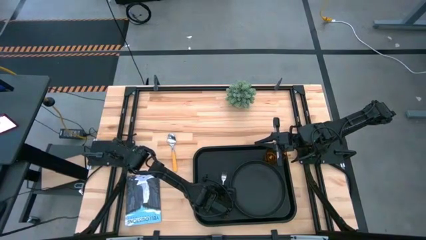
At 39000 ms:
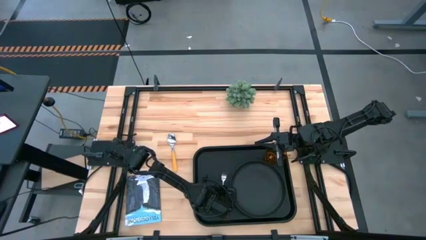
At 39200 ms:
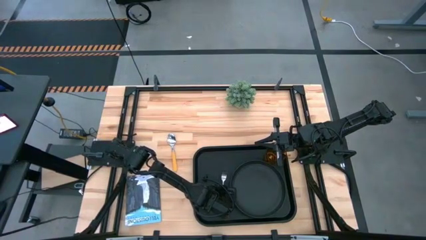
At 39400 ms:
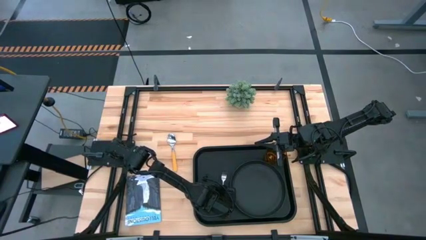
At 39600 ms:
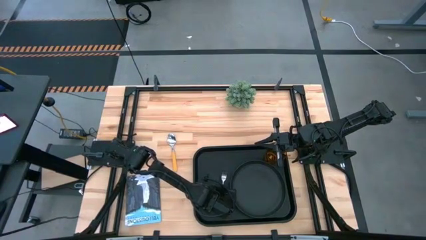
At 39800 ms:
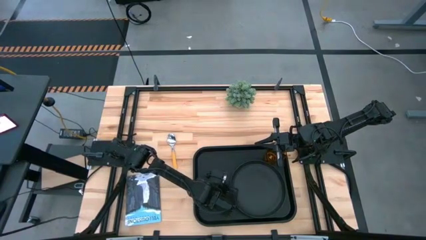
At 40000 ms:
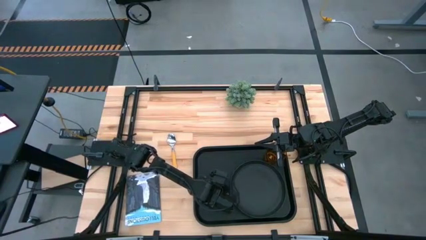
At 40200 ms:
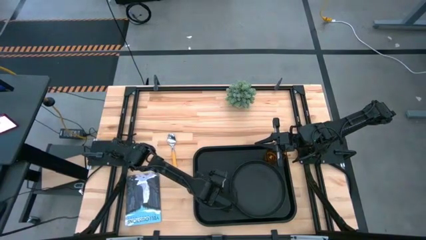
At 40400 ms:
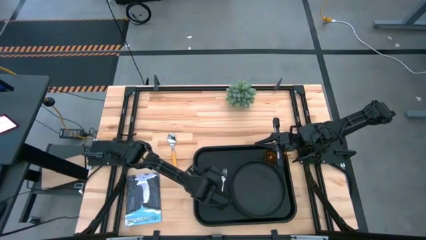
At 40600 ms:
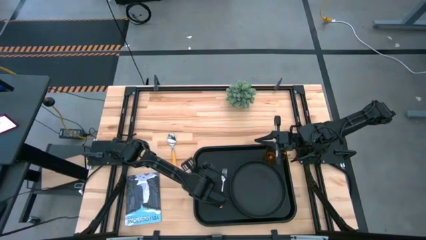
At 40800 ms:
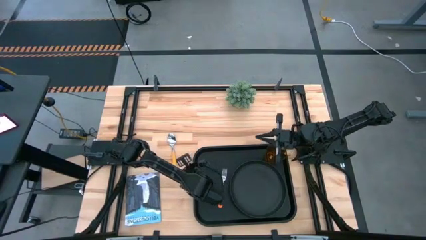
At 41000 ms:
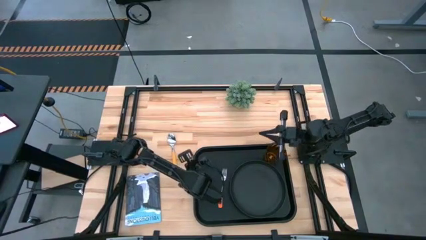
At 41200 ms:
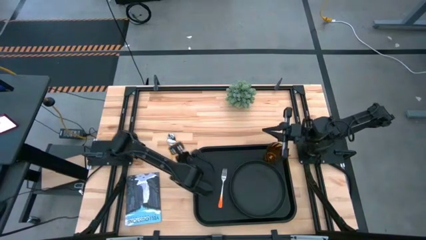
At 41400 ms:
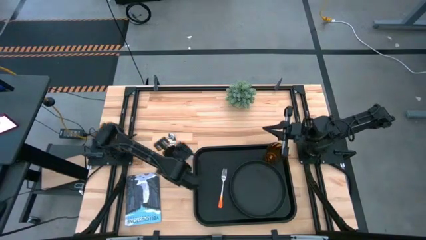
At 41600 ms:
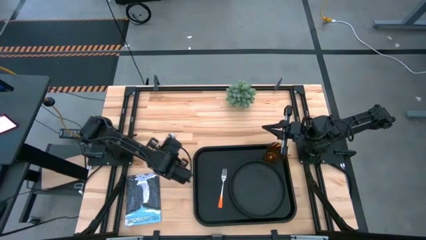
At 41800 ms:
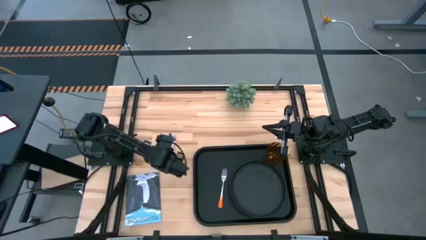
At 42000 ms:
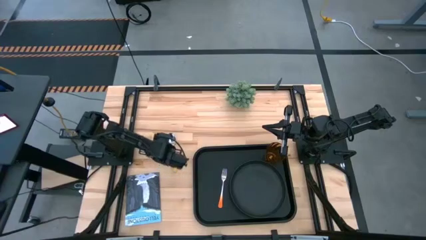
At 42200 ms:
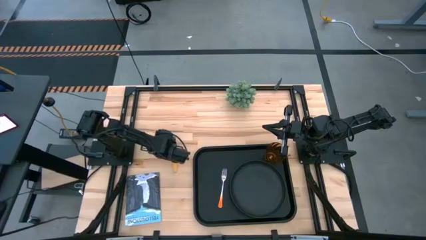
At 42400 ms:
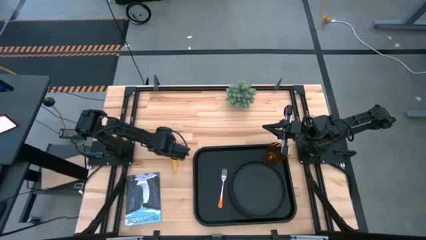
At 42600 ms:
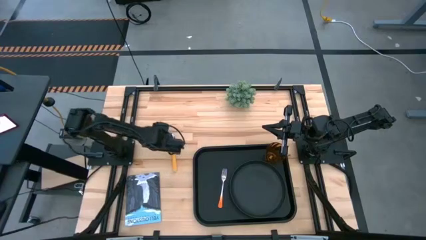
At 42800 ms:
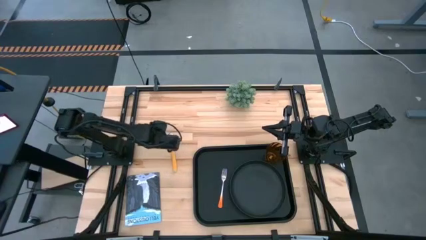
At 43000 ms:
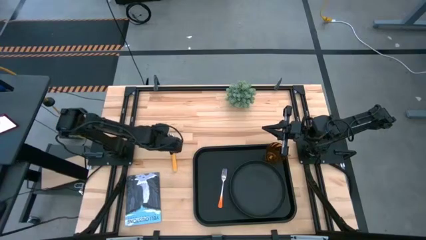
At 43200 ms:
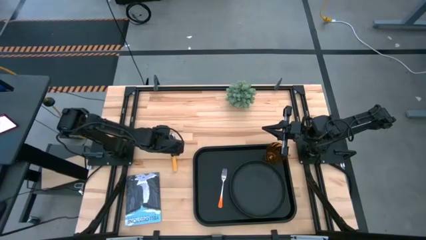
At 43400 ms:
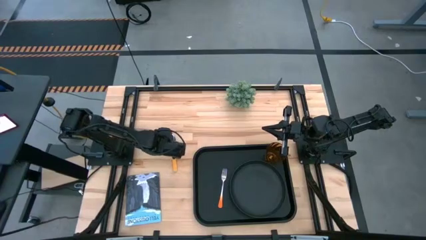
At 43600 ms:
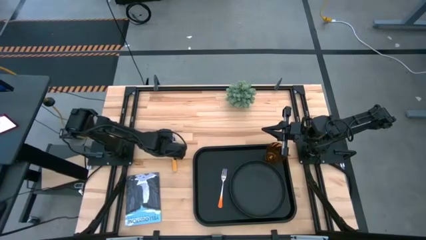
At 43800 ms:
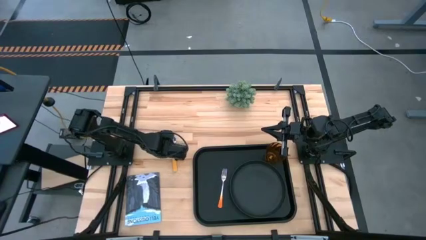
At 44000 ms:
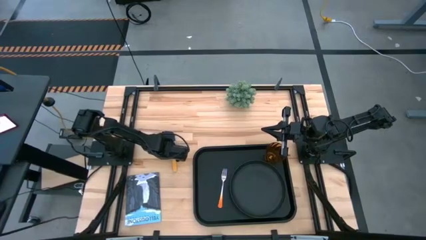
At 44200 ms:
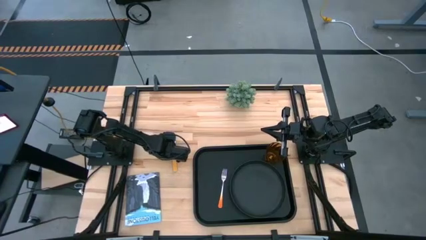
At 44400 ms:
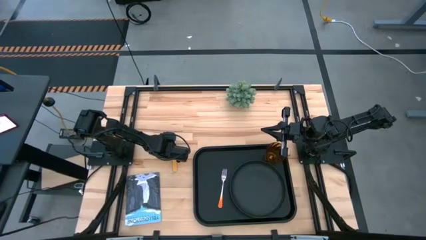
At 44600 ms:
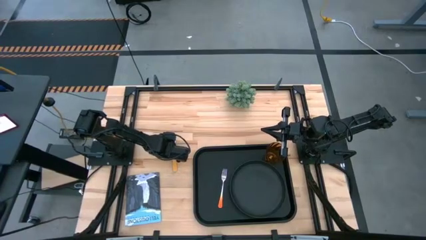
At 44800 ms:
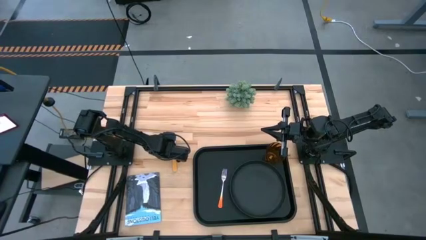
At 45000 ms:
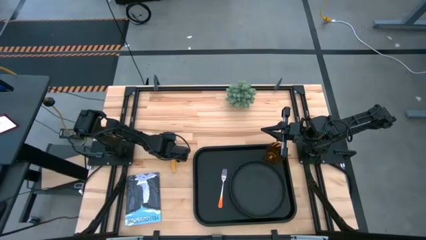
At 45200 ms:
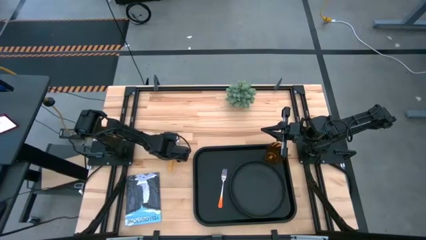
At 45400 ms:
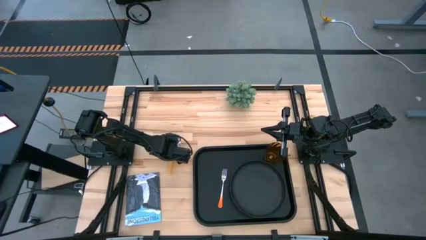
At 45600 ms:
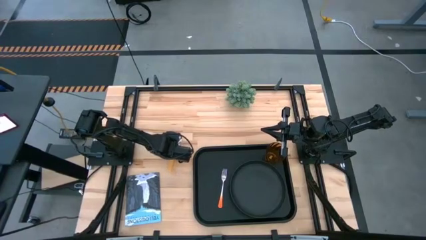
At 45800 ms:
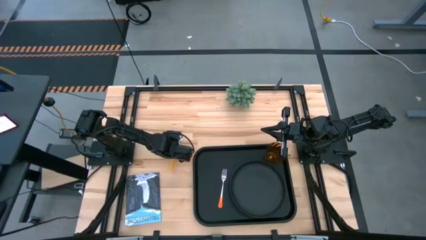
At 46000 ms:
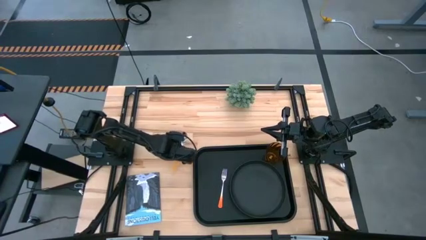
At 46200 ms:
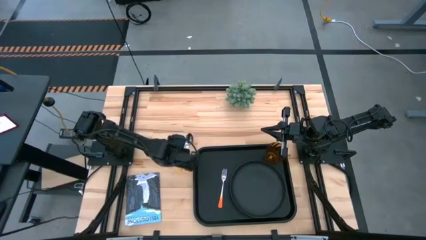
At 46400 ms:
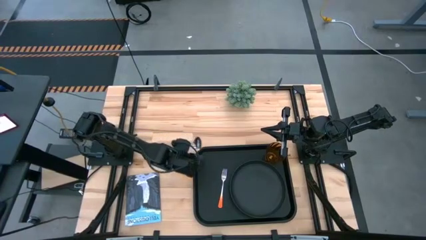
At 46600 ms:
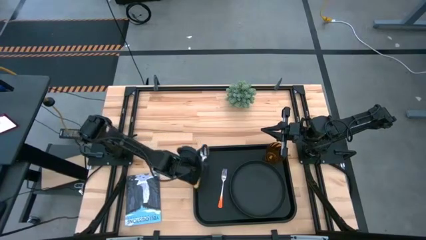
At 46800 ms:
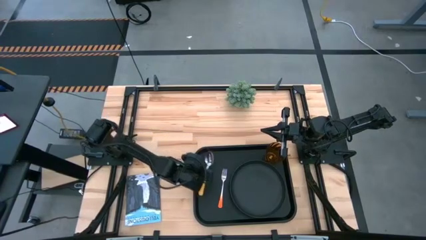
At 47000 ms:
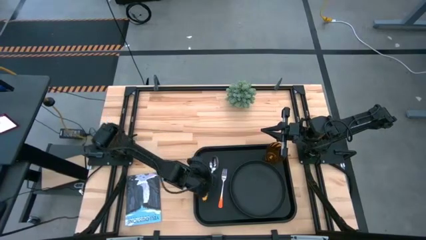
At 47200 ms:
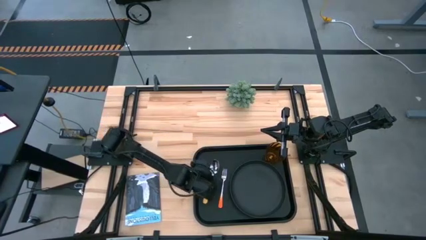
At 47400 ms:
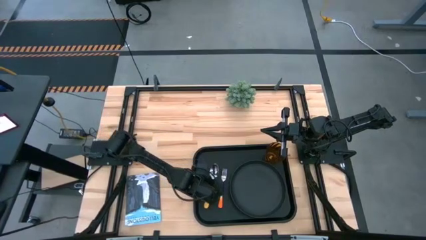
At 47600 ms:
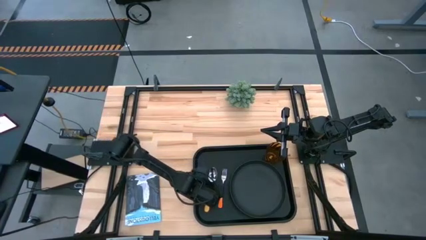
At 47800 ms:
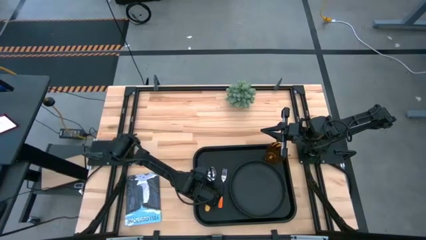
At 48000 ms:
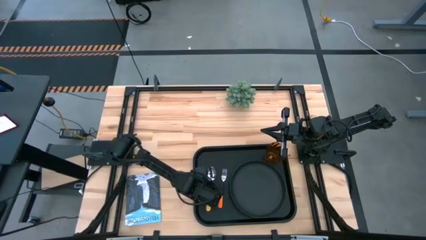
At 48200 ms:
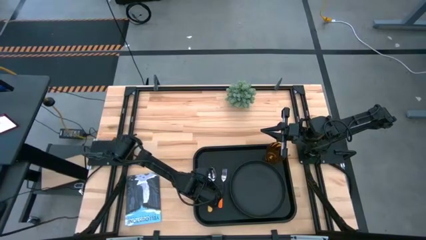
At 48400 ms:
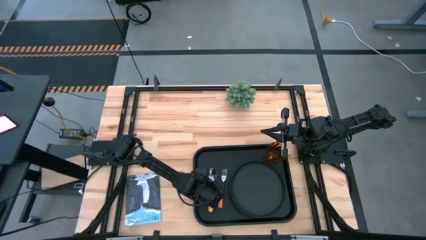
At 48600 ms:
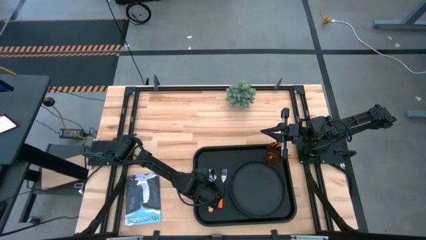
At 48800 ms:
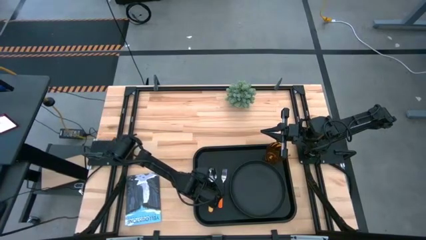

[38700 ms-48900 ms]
Task: Pick and place plate/cup/fork/spoon on tray
Put the yellow spoon on the black serving tray to the left of the orange fork

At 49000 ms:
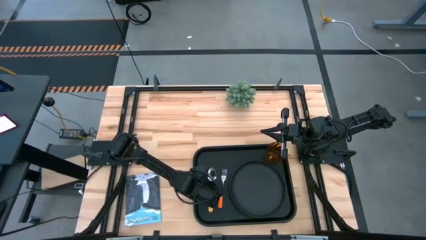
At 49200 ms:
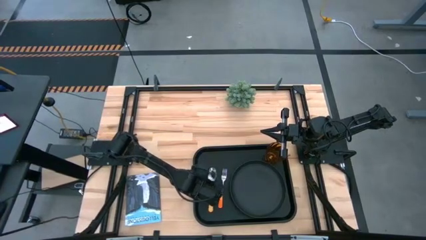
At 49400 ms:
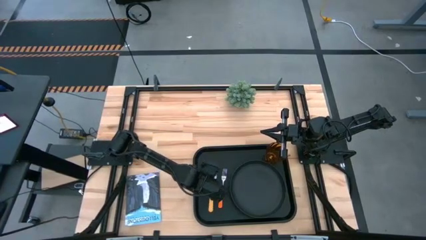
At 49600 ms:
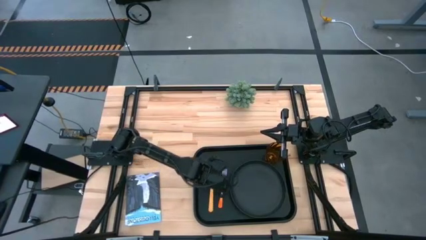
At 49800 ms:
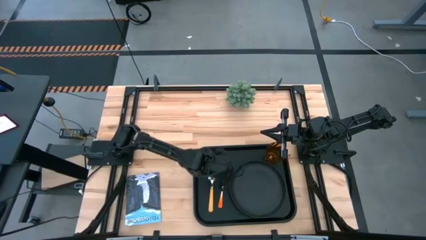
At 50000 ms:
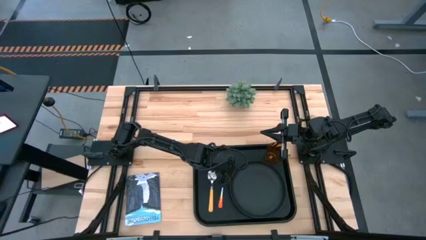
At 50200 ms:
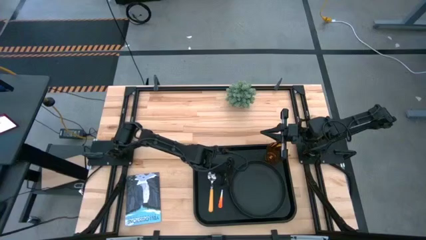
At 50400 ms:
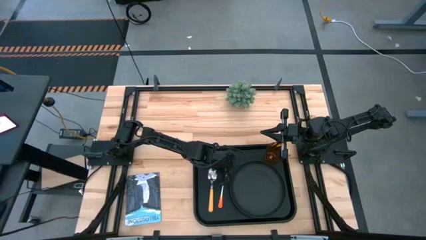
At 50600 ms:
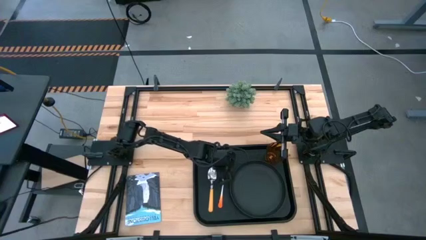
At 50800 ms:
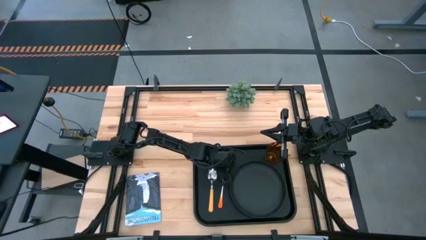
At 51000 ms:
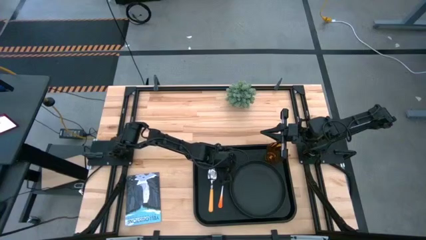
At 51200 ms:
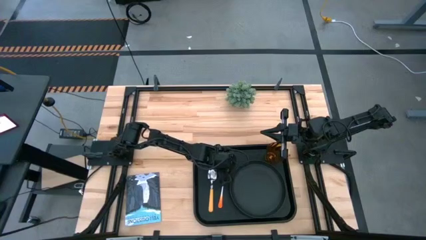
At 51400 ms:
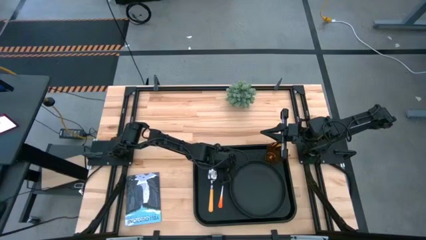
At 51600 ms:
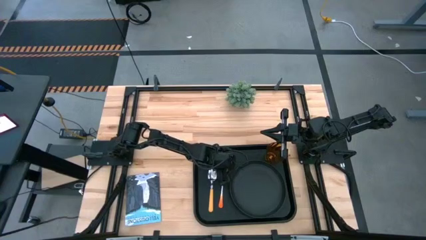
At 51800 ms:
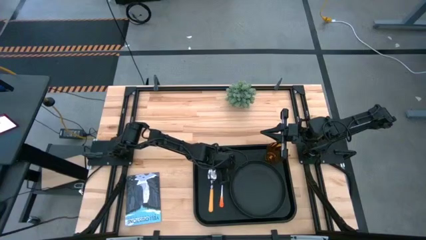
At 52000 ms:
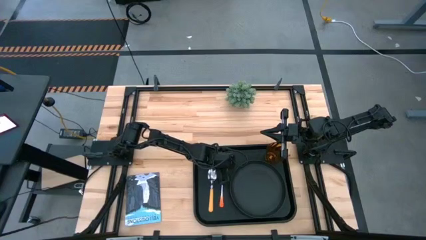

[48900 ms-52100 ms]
Adjust the orange fork on the black serving tray

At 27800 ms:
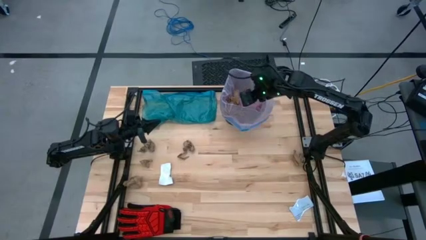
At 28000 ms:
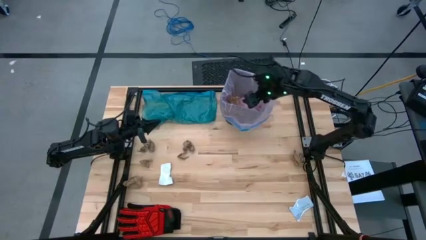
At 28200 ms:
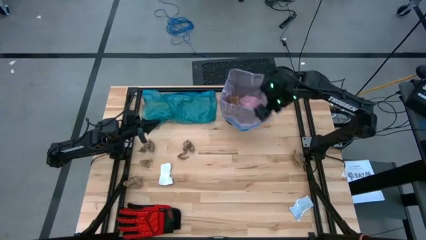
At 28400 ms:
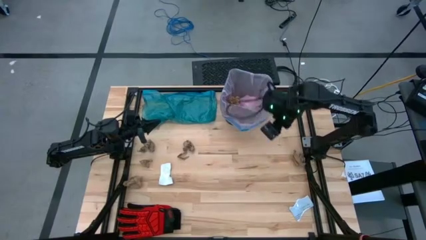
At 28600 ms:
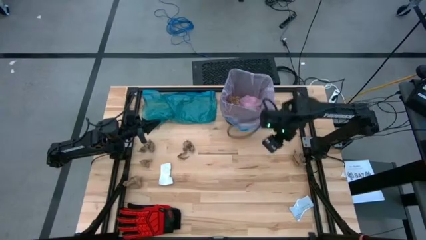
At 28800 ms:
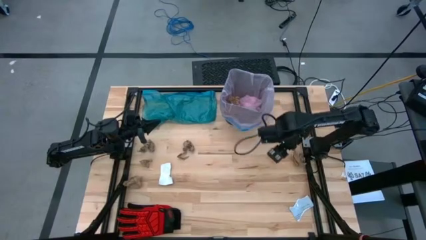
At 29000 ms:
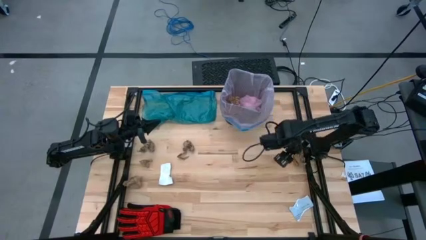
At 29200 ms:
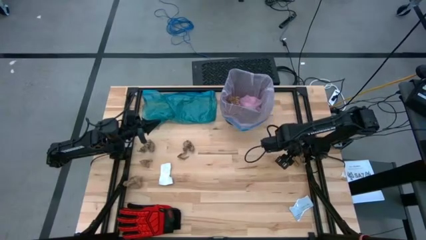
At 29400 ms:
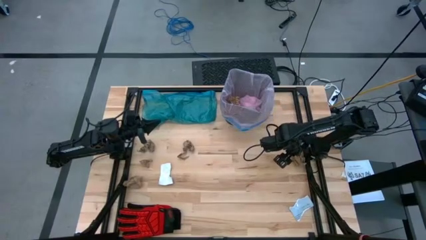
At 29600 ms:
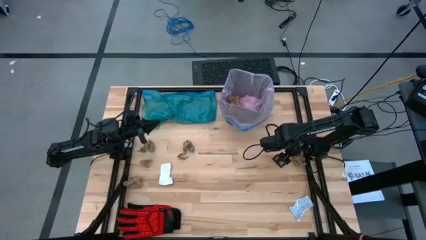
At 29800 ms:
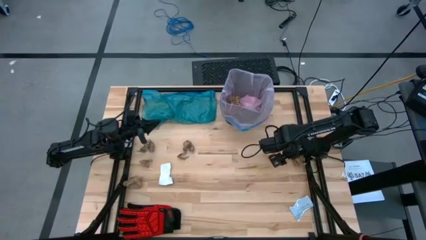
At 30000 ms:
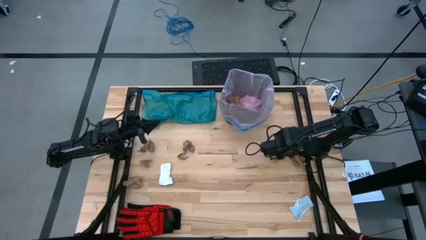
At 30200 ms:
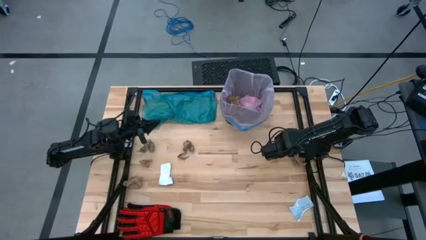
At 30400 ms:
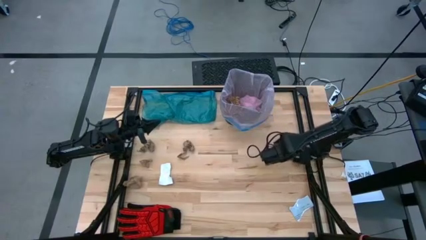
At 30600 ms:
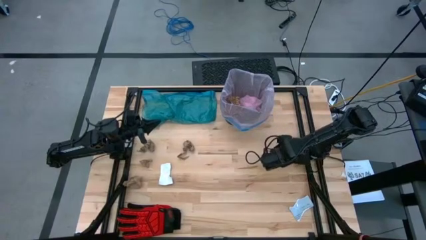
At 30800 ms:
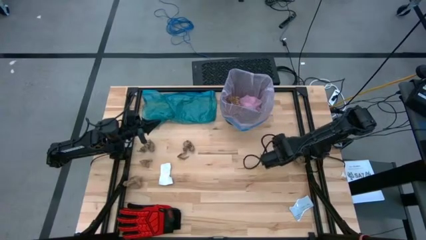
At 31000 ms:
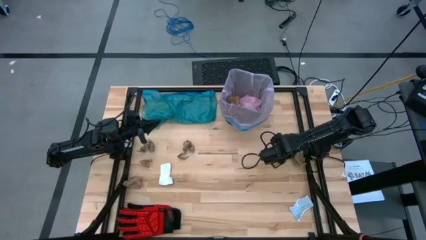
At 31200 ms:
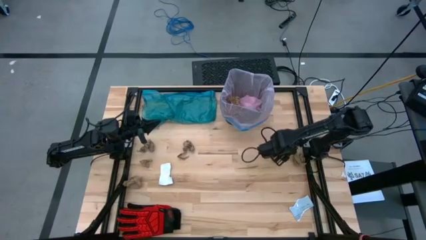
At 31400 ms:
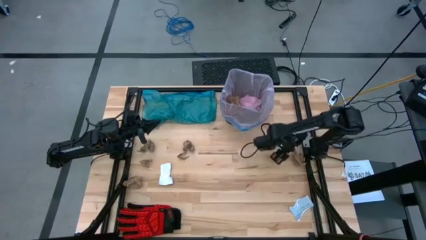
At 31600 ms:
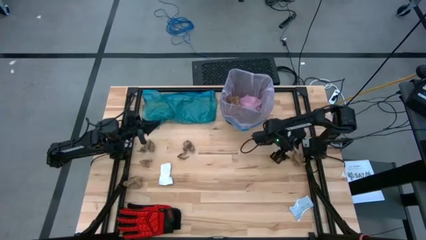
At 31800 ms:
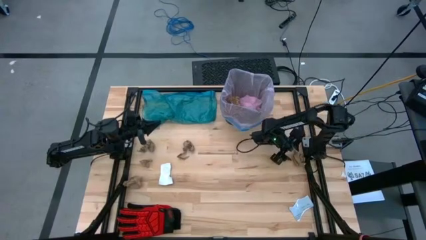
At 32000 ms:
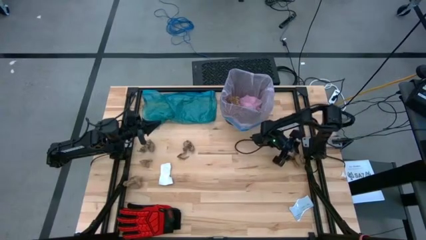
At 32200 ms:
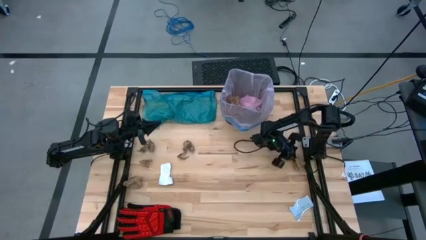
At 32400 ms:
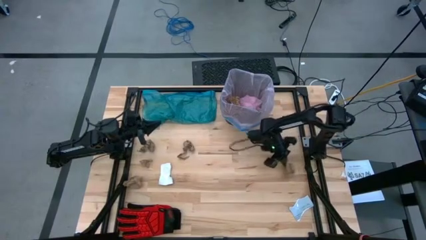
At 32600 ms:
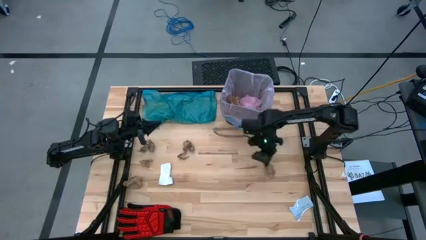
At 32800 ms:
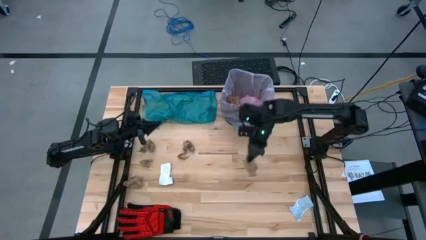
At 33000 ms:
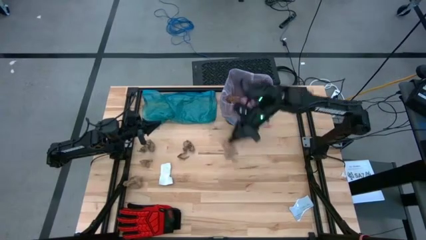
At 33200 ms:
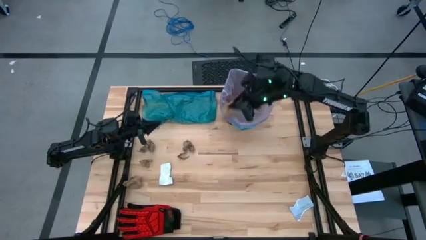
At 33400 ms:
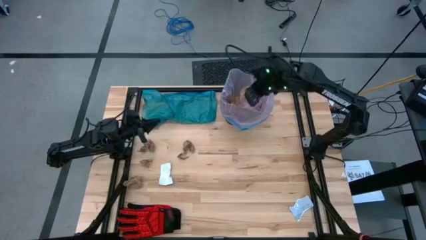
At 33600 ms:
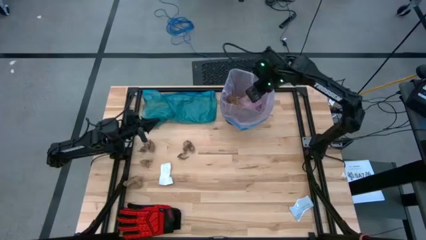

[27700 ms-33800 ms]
Task: place trash/remove bag and relplace
Put the brown paper into the black trash bin
